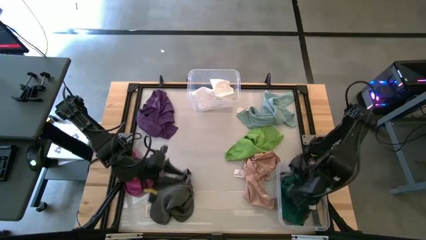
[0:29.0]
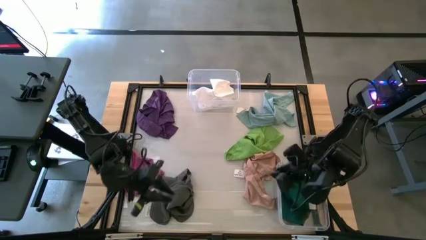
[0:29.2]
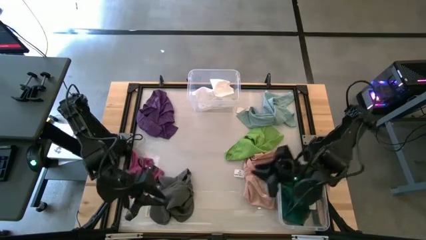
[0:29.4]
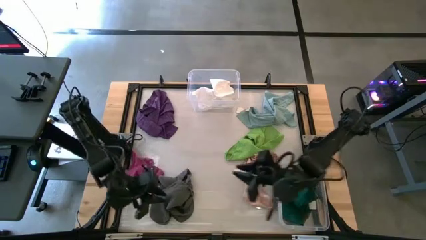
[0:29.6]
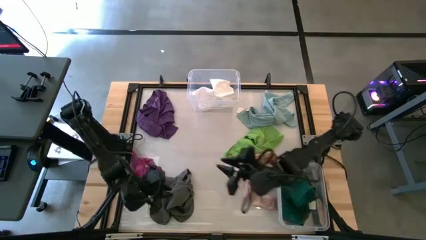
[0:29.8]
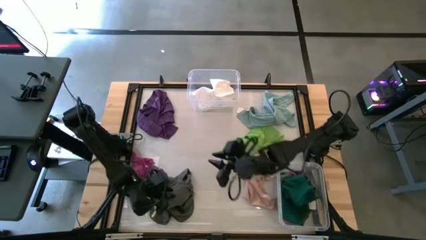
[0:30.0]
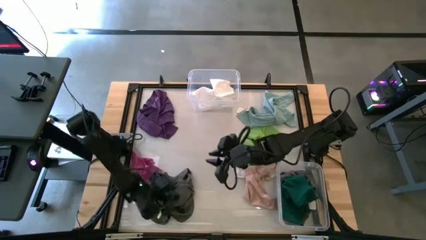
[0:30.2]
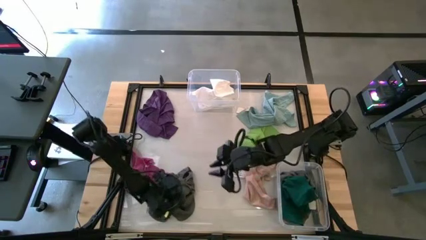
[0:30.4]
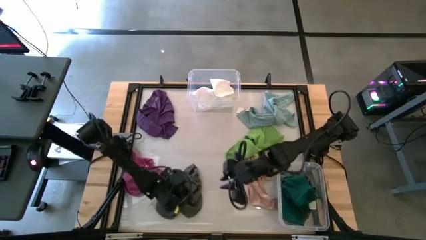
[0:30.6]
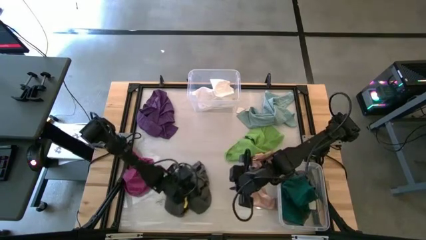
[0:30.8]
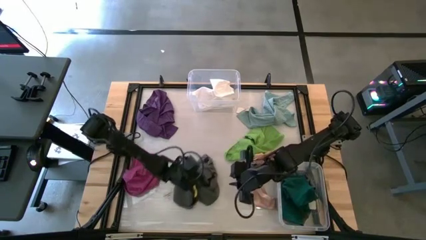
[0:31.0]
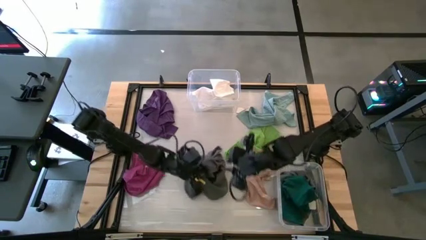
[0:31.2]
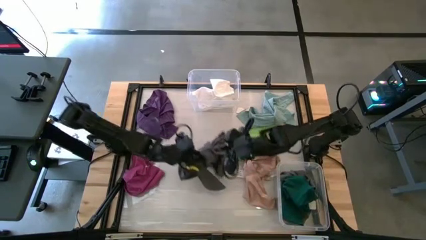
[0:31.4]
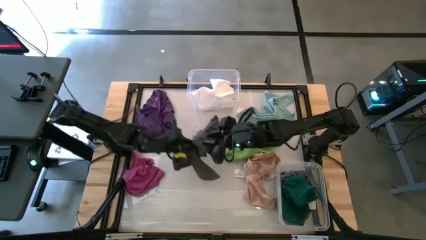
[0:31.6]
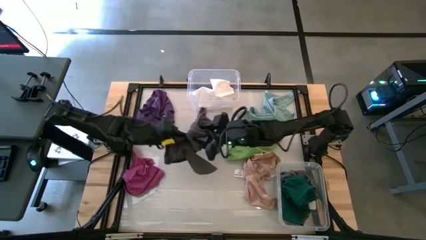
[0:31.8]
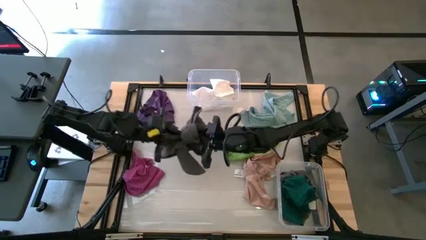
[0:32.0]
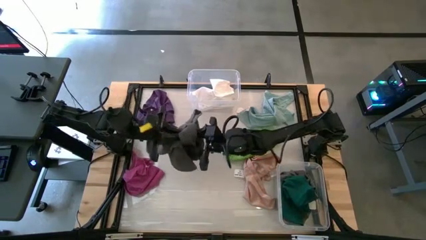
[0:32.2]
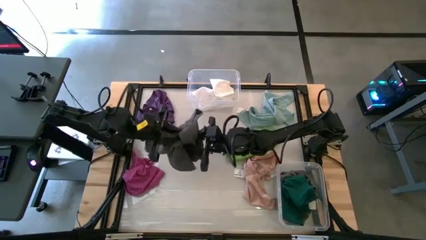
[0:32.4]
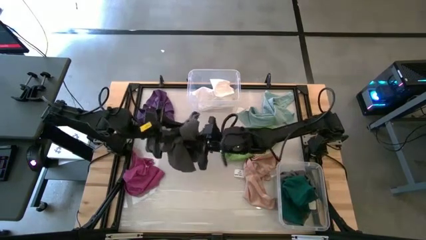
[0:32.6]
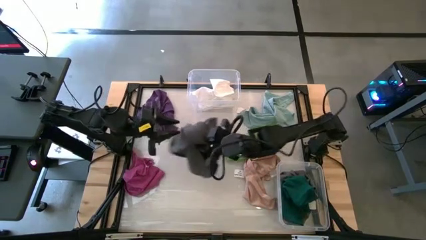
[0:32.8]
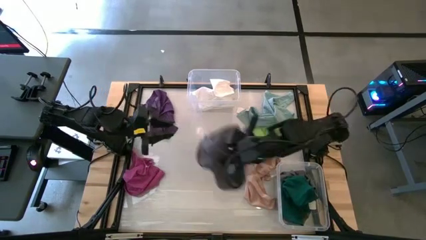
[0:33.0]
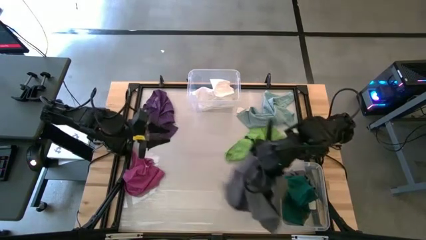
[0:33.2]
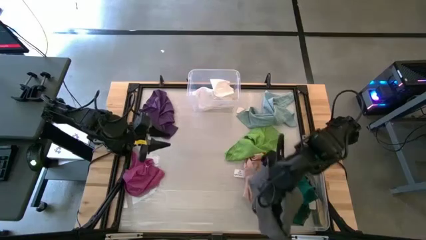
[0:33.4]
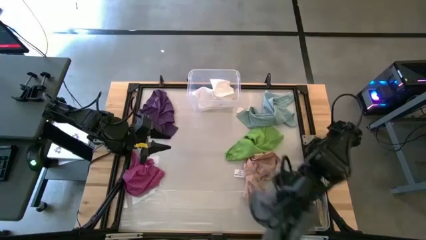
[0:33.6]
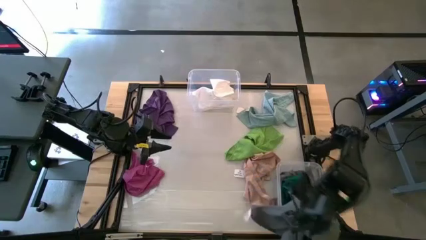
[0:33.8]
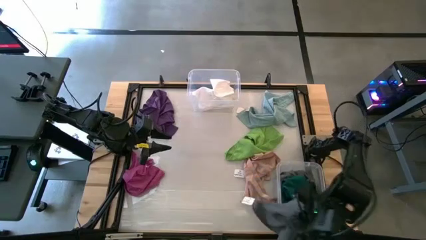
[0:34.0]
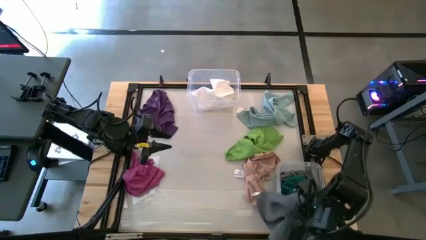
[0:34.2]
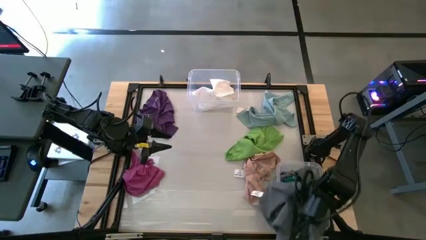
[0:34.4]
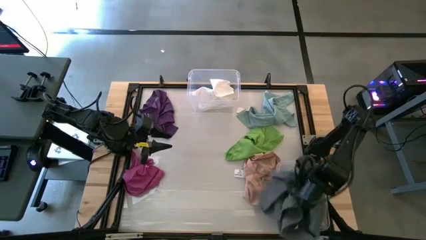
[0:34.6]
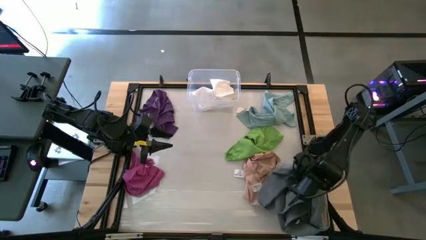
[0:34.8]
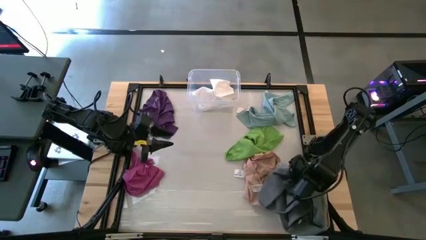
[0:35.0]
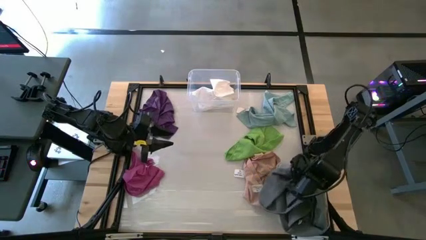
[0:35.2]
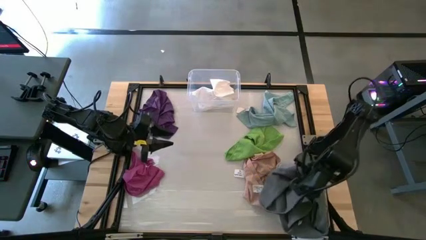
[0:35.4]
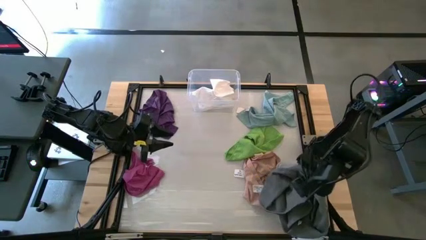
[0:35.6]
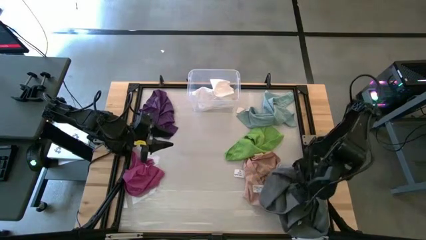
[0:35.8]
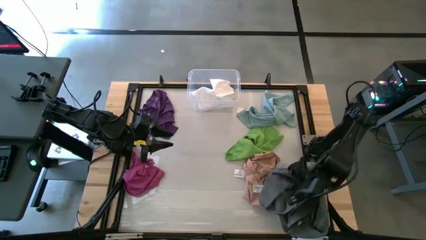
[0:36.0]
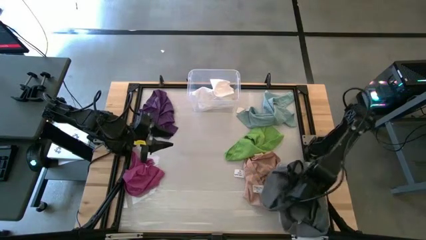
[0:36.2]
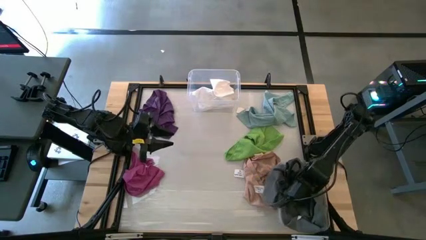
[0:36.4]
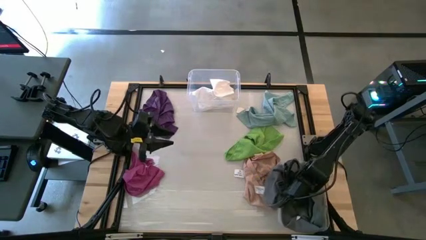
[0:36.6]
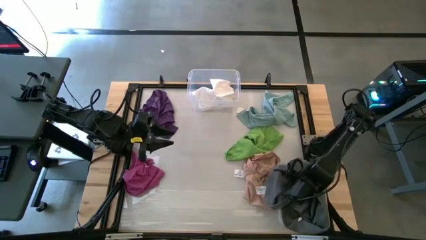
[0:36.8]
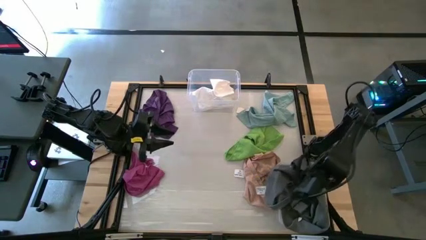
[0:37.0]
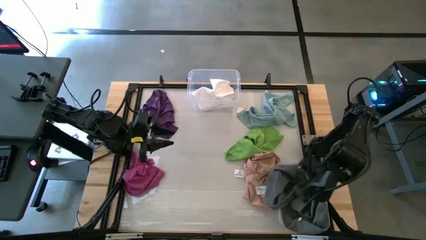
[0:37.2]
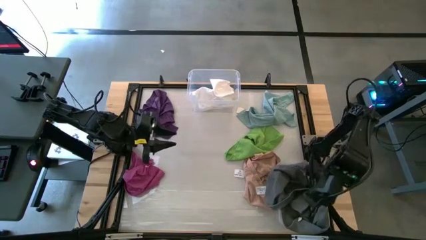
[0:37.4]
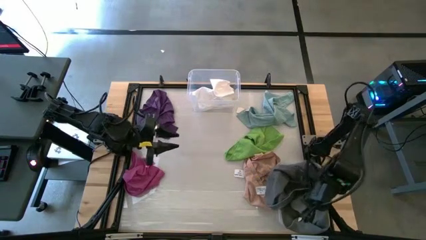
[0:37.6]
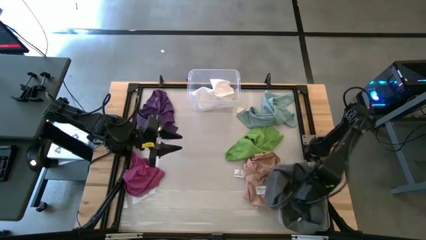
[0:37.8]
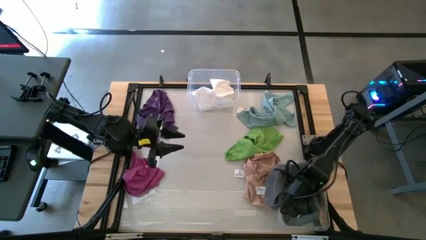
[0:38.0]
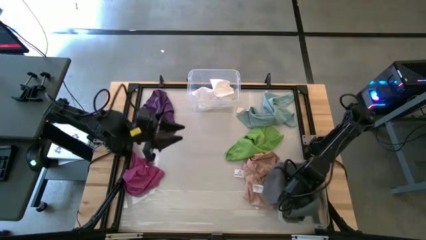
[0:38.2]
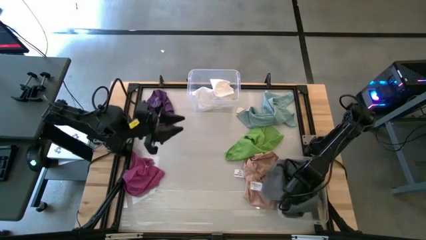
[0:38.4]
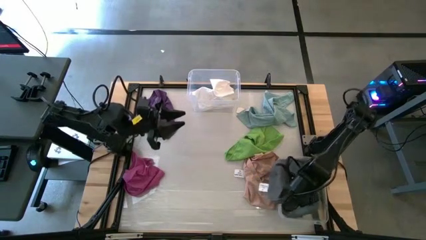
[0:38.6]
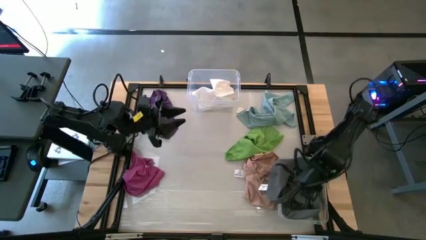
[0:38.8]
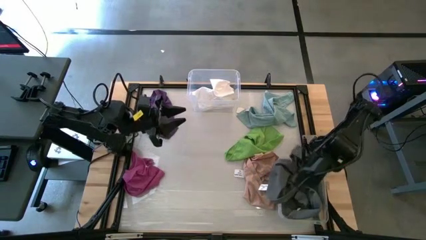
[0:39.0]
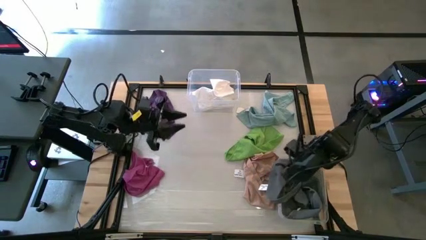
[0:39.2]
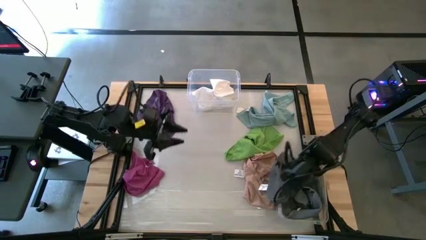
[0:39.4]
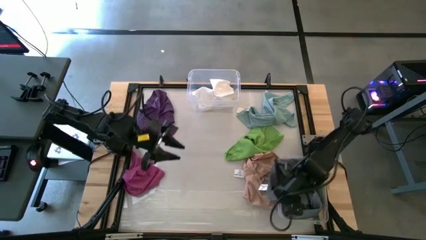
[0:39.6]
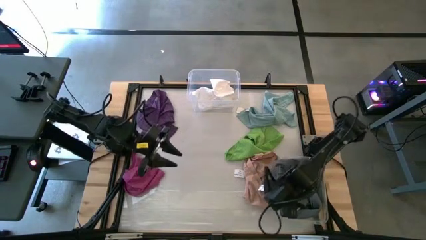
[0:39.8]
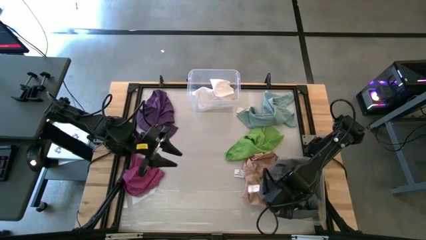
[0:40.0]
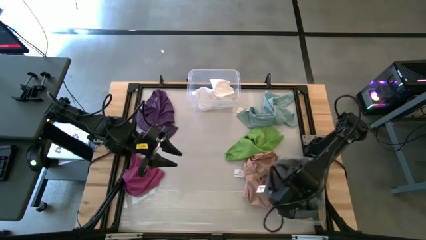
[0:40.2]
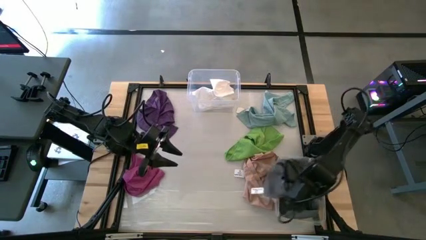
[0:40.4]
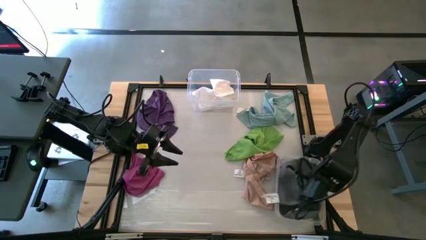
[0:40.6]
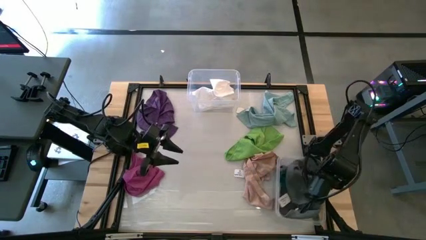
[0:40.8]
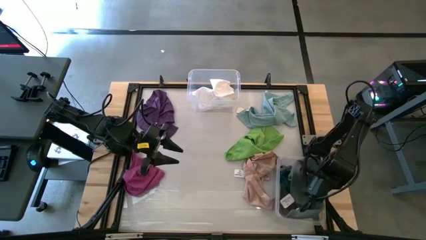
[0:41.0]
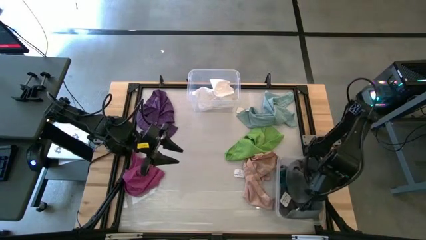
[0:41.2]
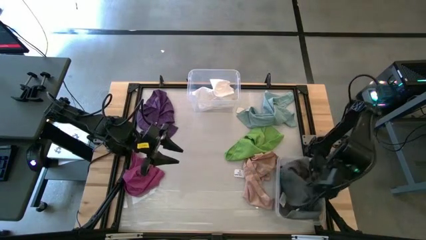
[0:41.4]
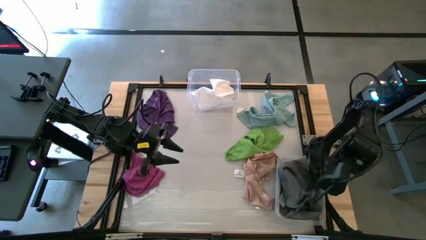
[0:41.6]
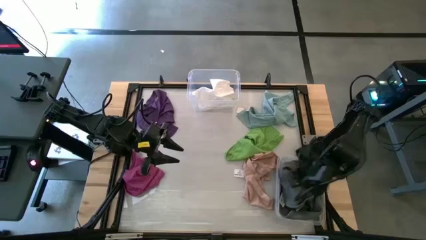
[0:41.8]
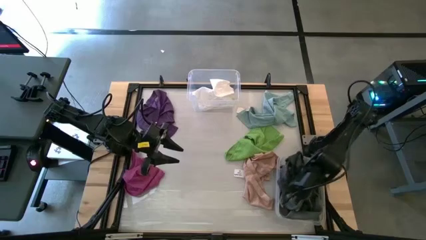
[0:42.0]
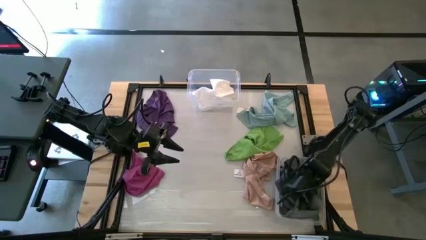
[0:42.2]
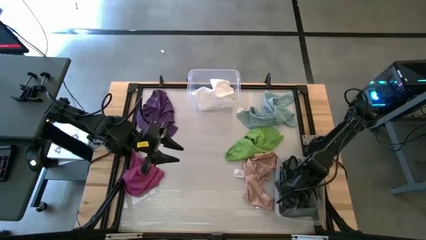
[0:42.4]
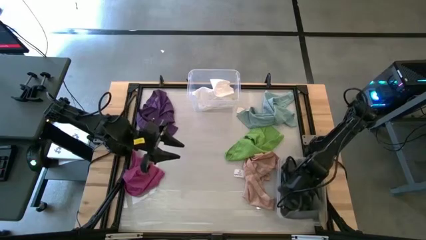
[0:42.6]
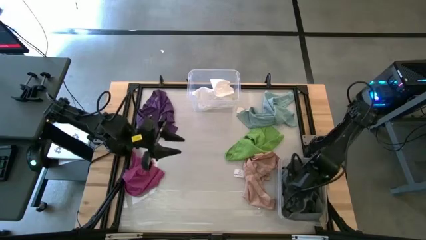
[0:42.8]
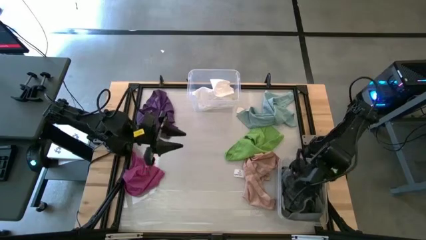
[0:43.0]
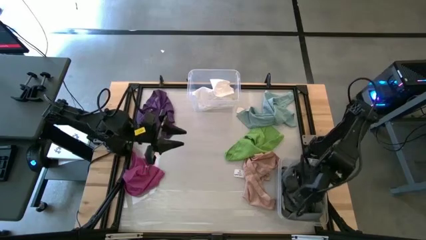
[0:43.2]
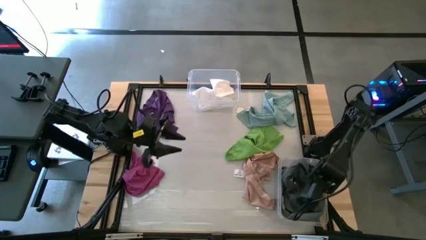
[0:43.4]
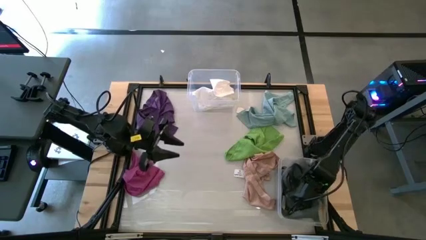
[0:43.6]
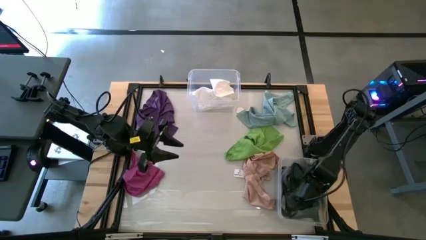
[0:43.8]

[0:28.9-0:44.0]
Task: Sort towels by color in basket
Put the gray towel into the bottom transparent bin

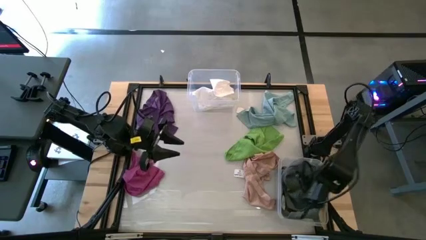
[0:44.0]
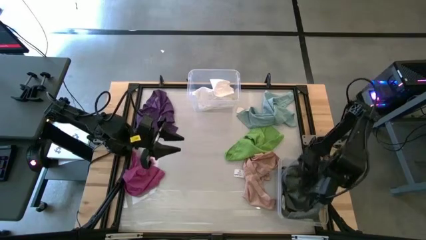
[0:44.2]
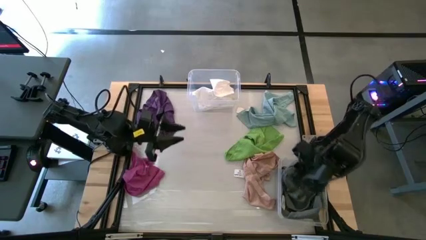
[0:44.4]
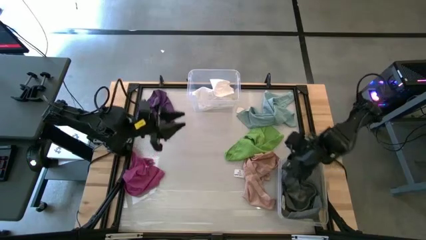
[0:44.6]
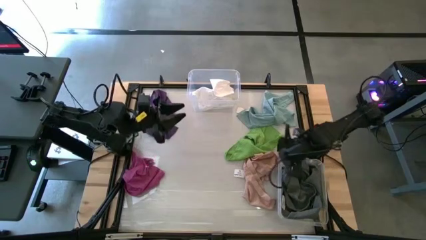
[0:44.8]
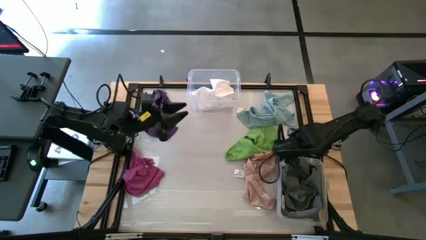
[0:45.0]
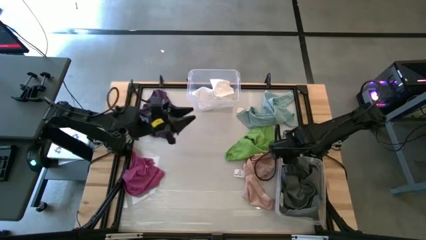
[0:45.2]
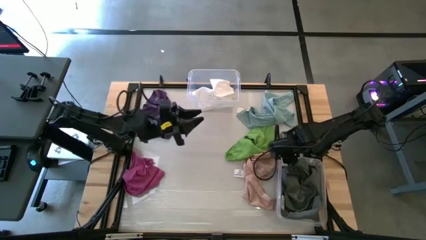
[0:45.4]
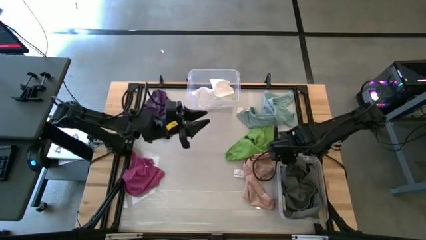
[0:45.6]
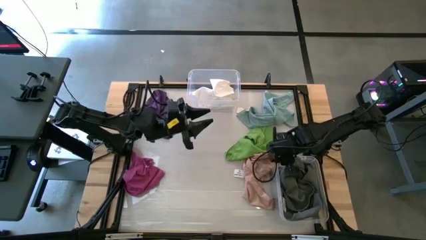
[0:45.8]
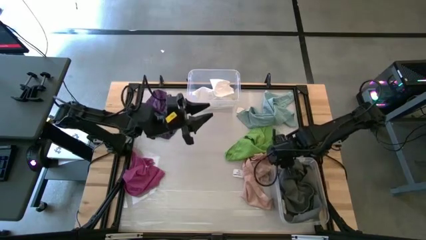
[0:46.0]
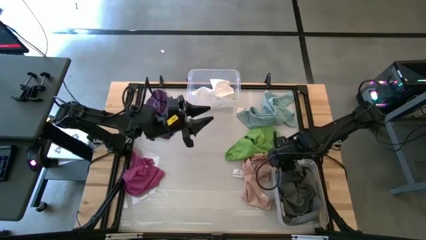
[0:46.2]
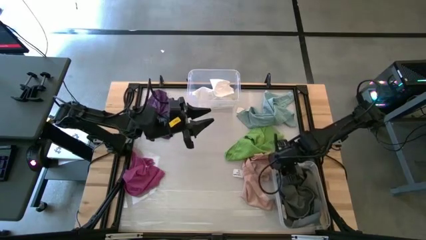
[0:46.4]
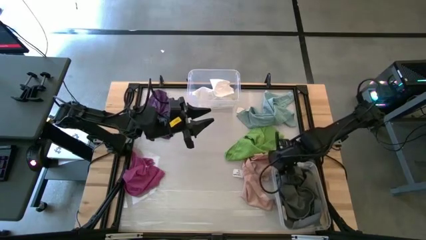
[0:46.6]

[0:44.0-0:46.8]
Adjust the bottom transparent bin
